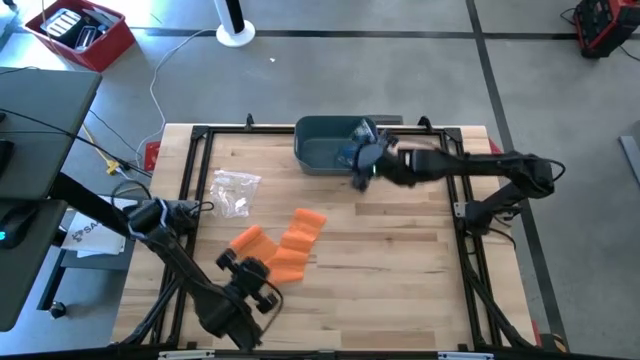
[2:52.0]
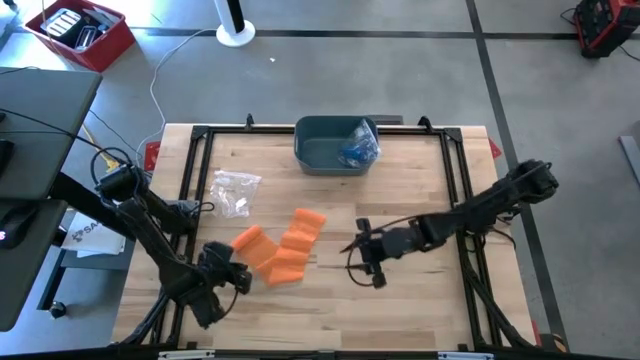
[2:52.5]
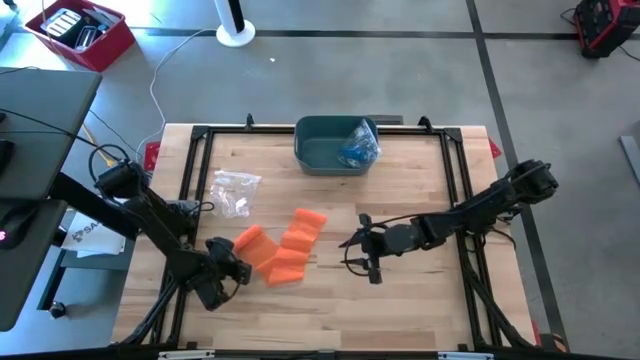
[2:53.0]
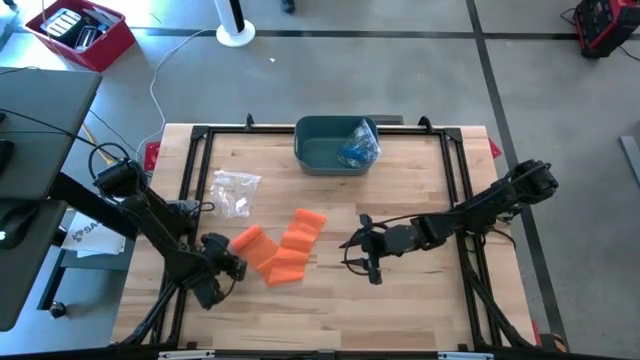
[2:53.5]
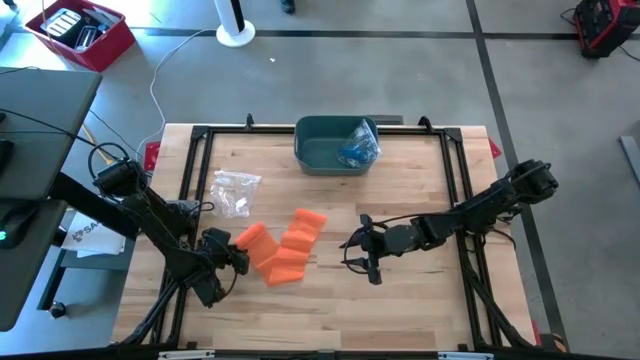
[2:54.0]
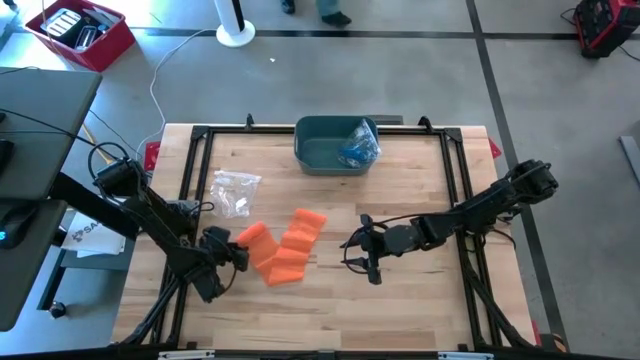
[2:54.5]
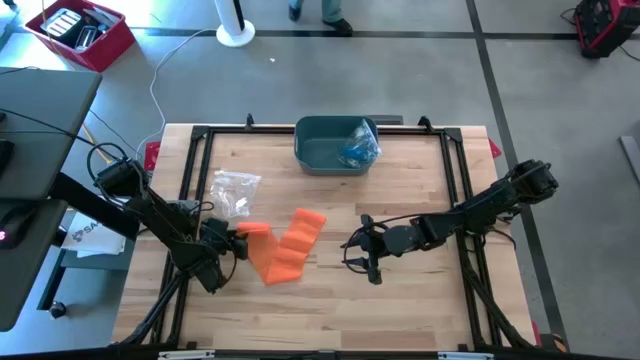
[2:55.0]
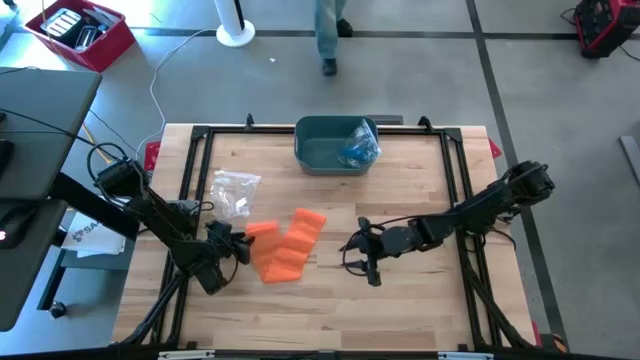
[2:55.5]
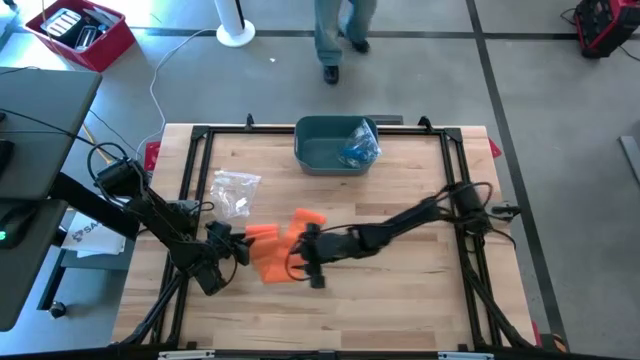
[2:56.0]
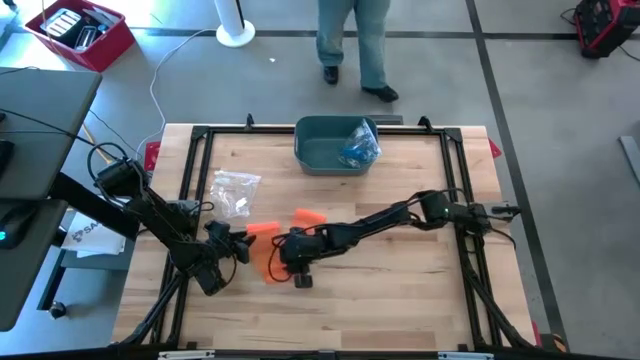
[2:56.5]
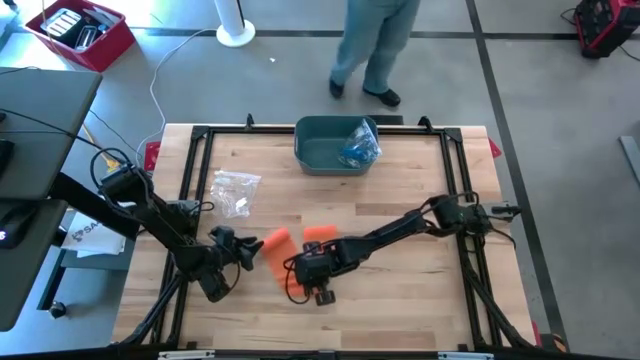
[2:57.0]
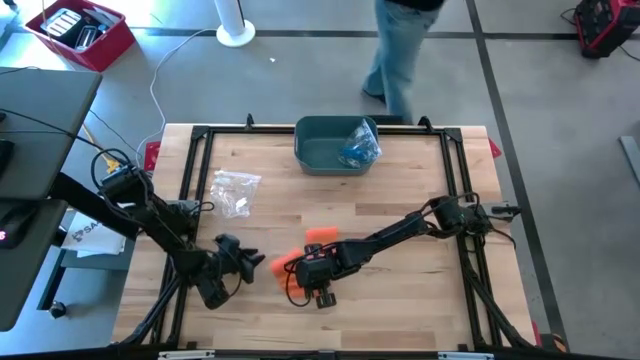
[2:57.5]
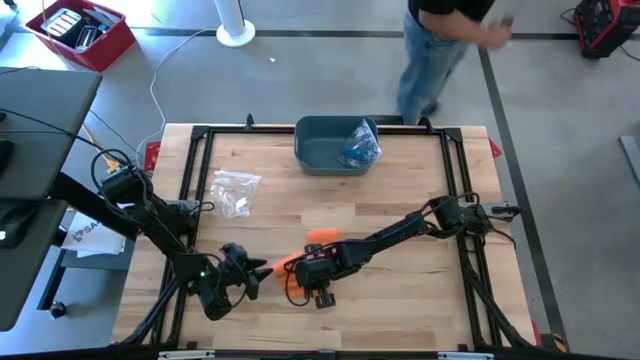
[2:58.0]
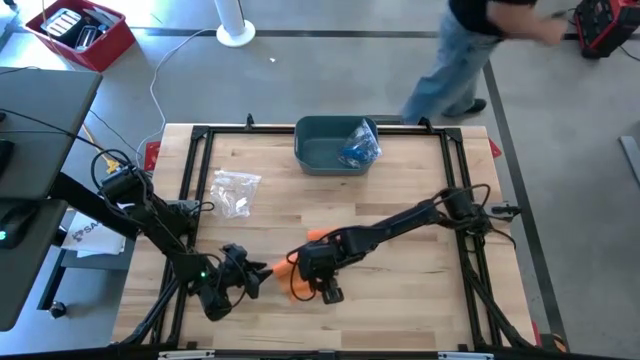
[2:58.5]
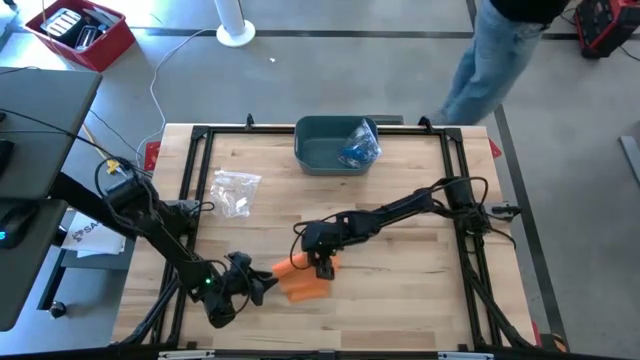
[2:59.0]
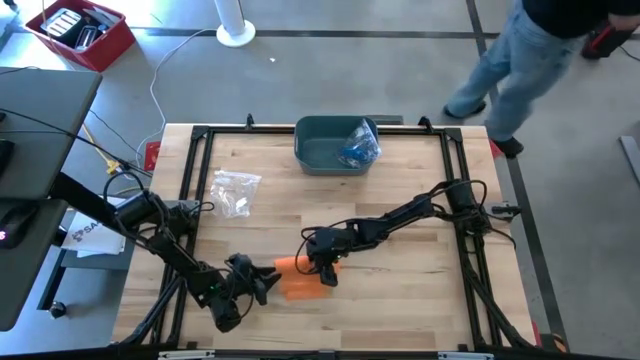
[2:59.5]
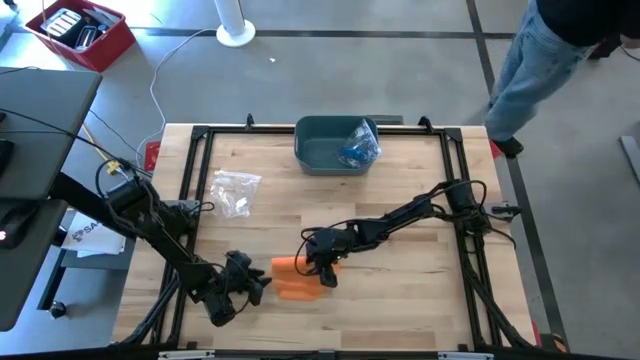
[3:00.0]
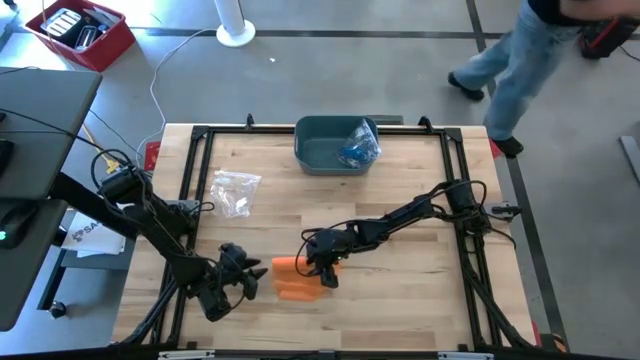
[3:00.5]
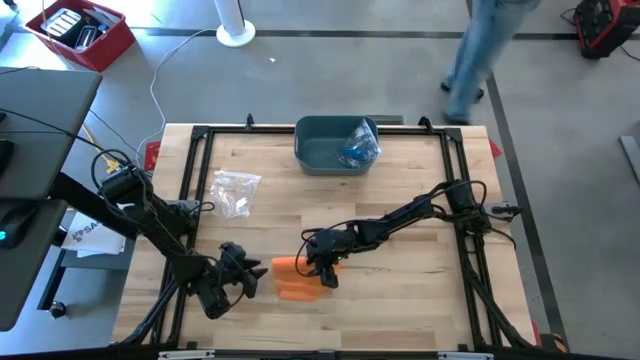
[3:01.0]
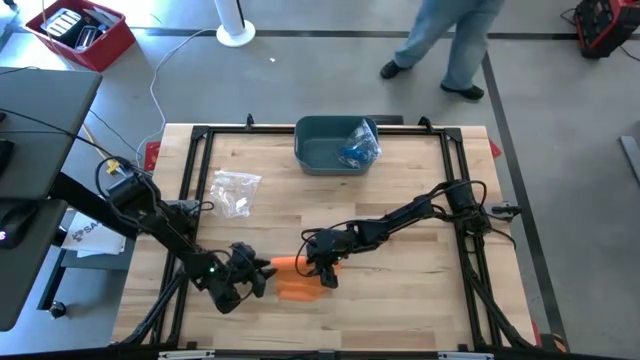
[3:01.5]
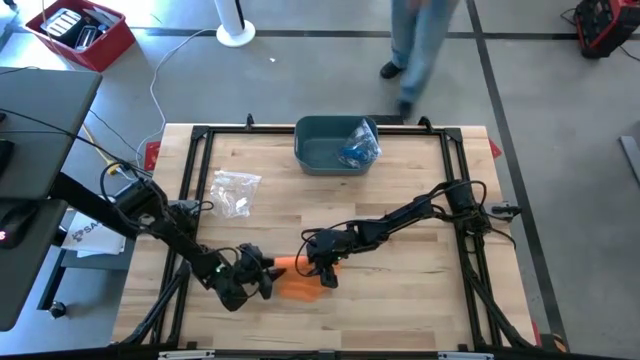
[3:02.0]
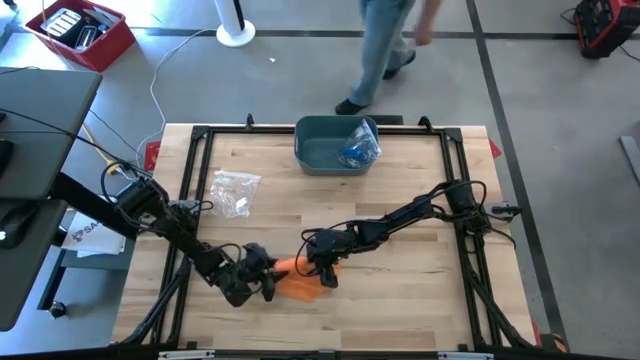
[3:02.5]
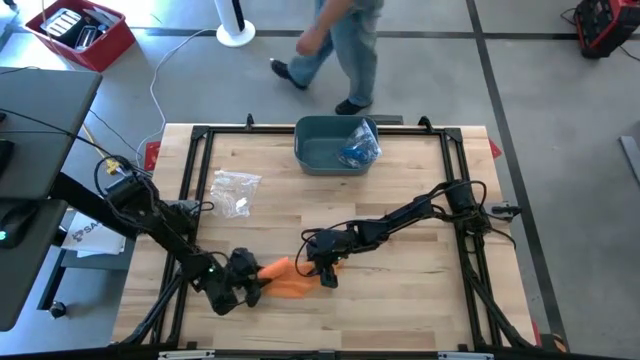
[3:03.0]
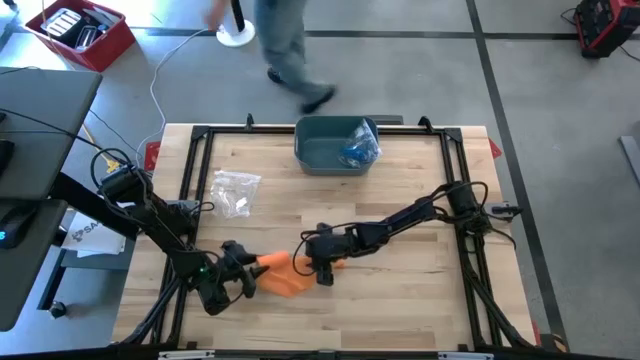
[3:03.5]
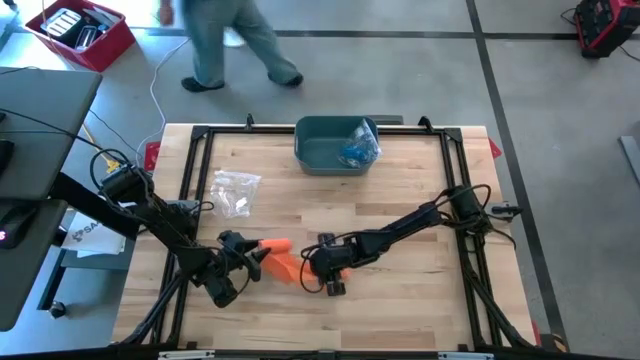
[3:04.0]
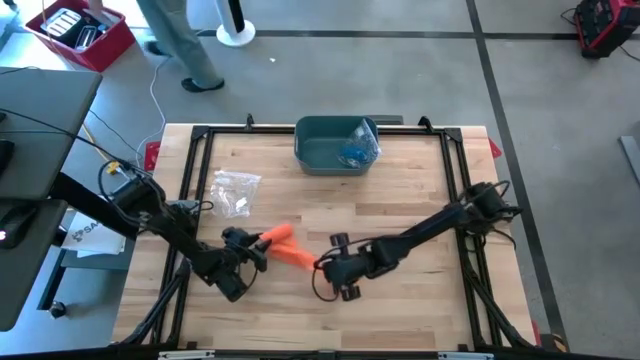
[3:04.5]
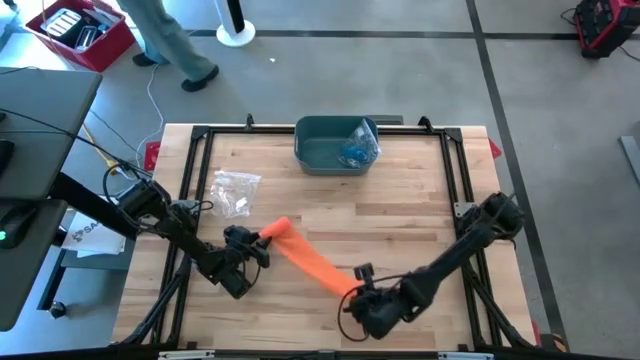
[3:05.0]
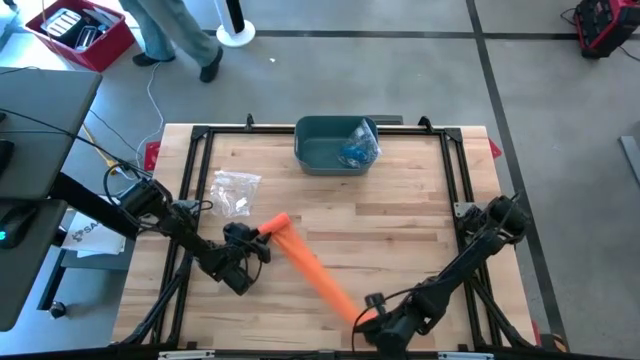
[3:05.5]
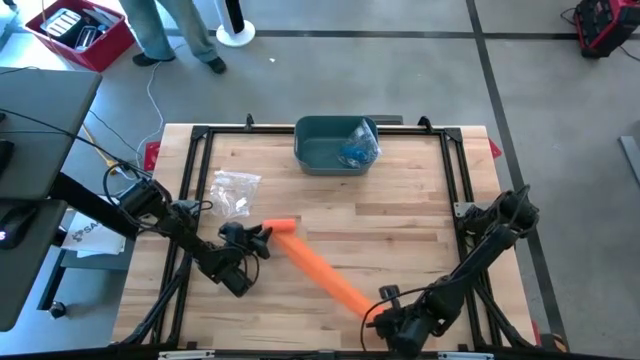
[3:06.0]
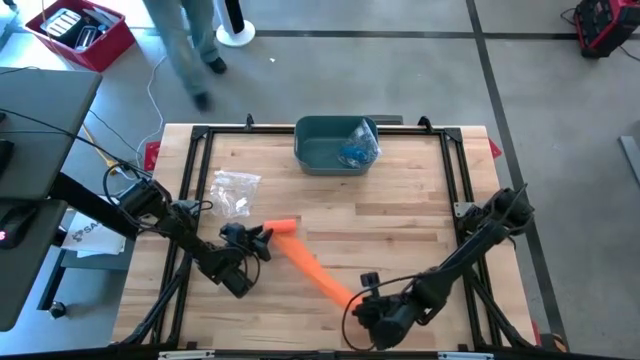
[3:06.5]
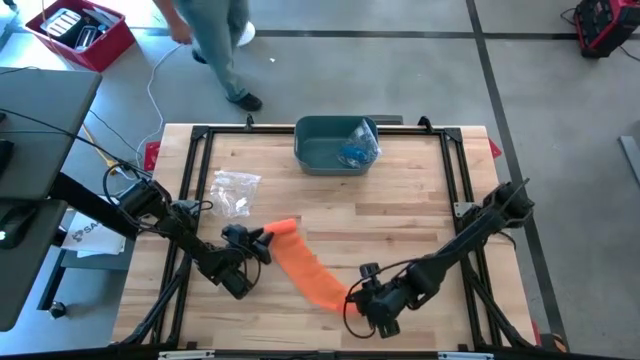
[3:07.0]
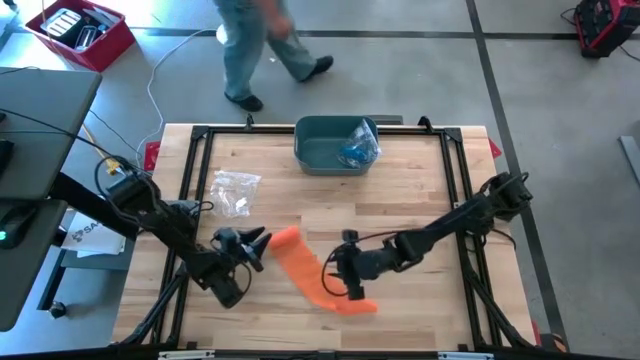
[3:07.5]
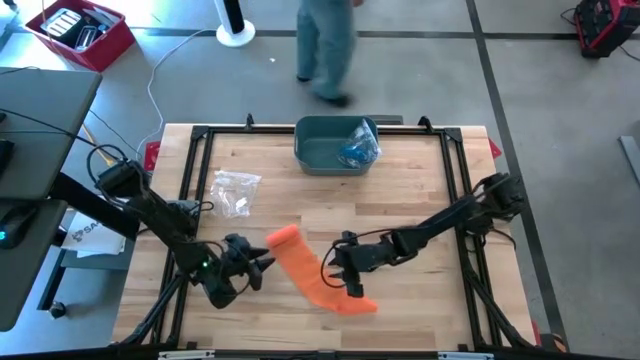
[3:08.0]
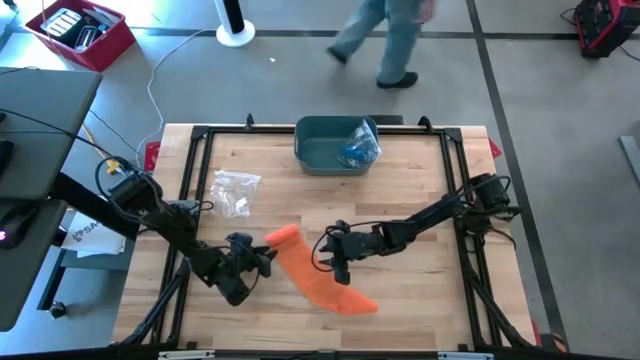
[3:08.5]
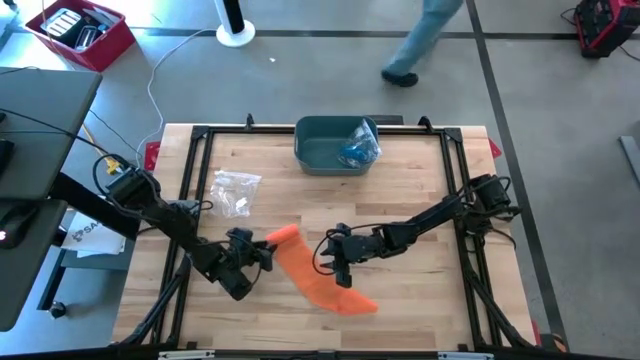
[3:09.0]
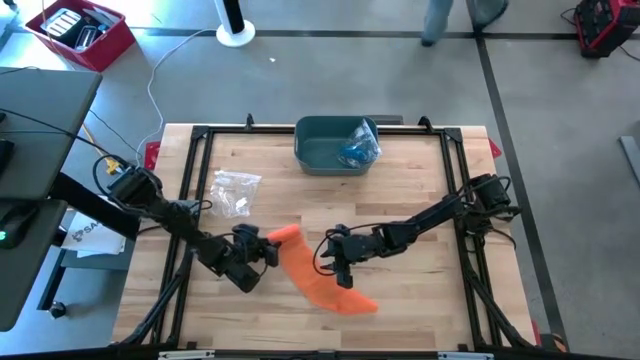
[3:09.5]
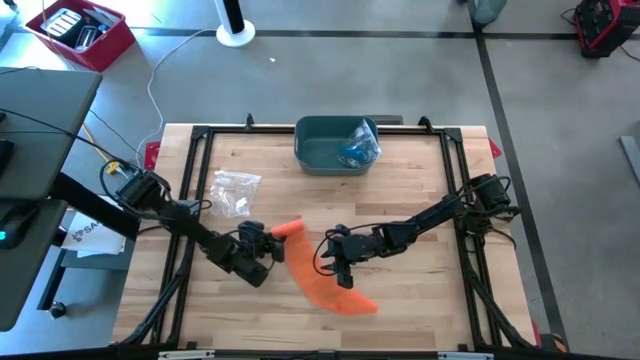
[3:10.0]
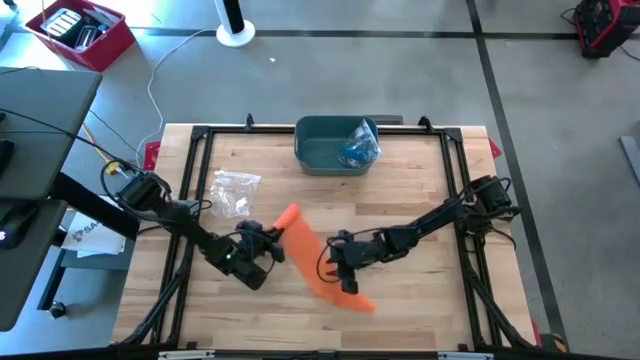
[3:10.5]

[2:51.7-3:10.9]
Task: Roll bandage
Roll the orange bandage
